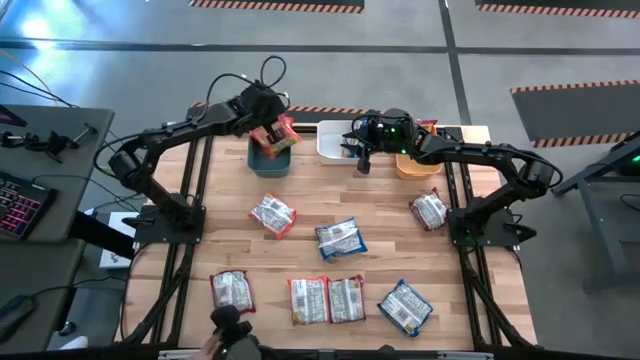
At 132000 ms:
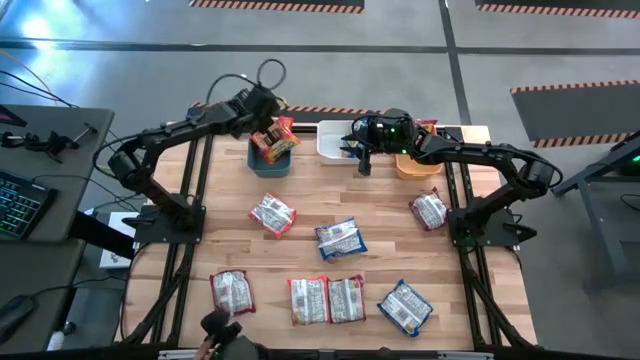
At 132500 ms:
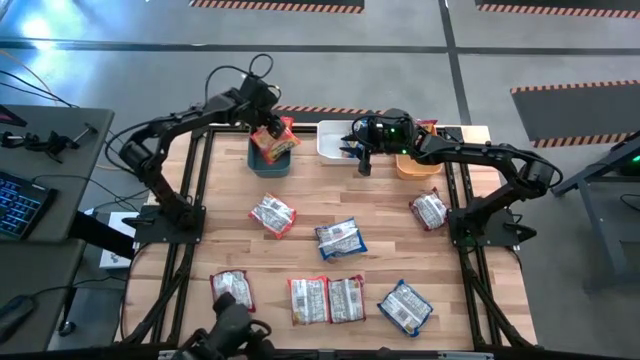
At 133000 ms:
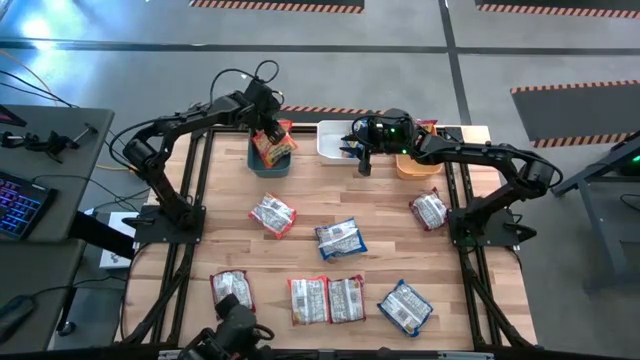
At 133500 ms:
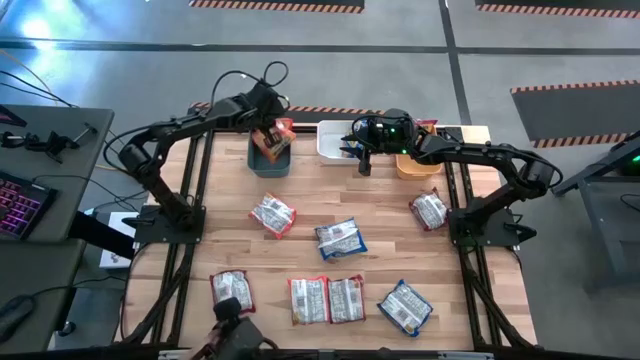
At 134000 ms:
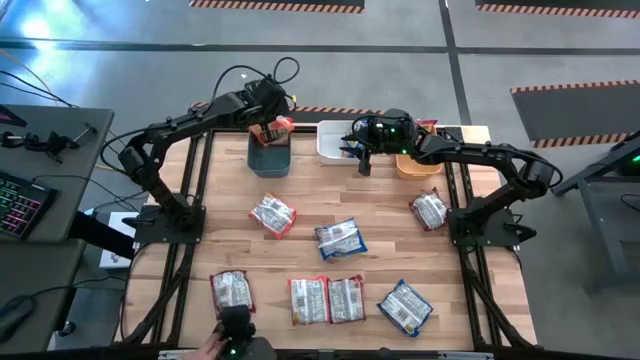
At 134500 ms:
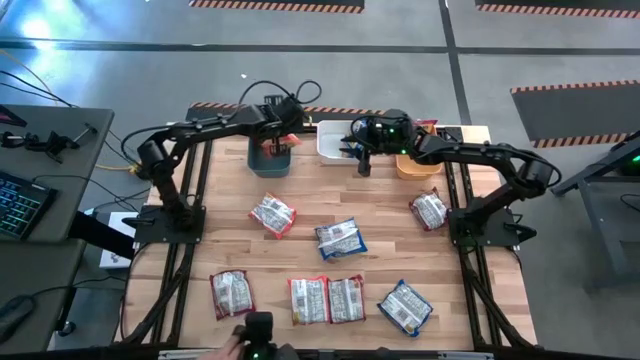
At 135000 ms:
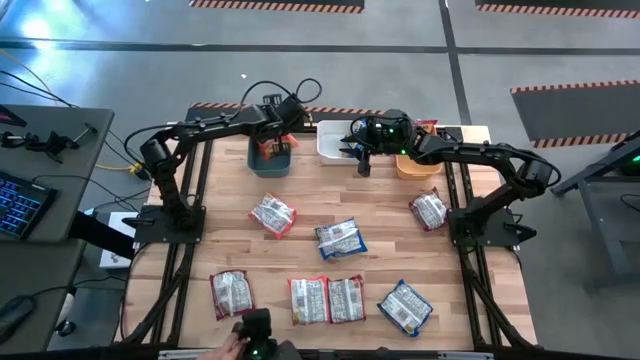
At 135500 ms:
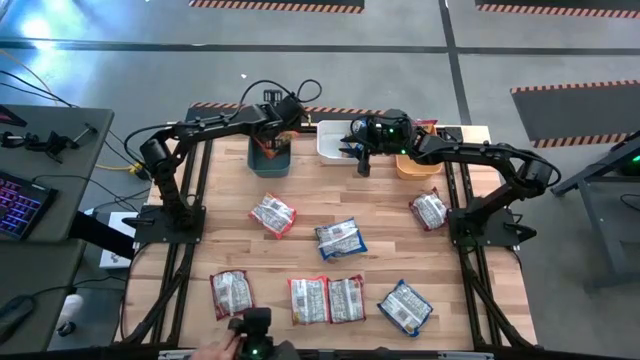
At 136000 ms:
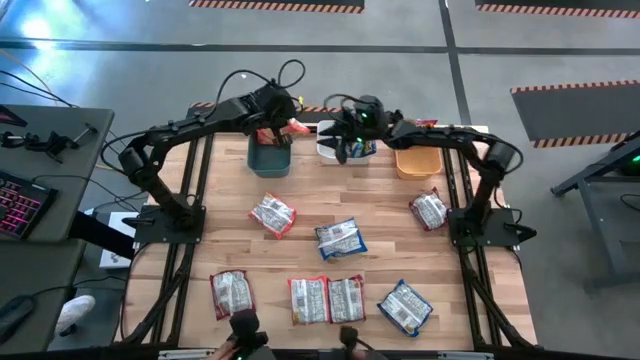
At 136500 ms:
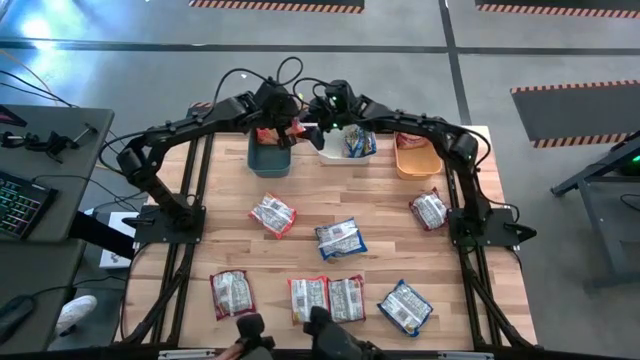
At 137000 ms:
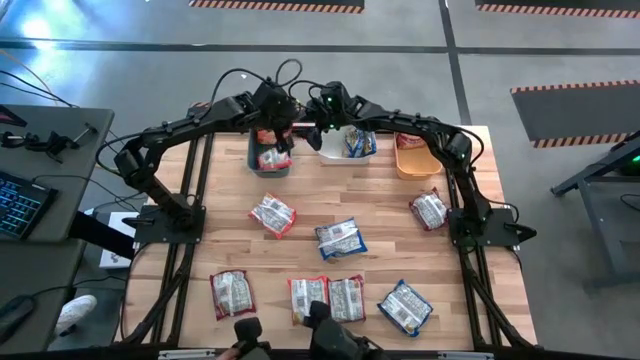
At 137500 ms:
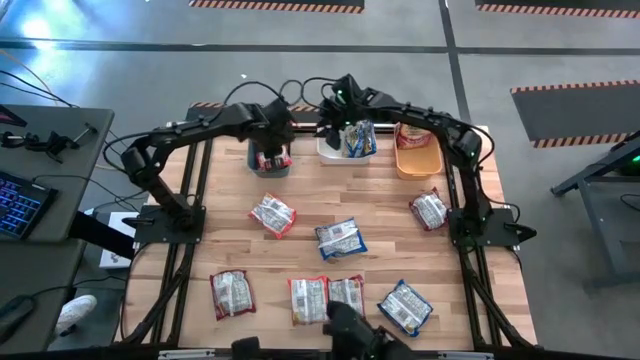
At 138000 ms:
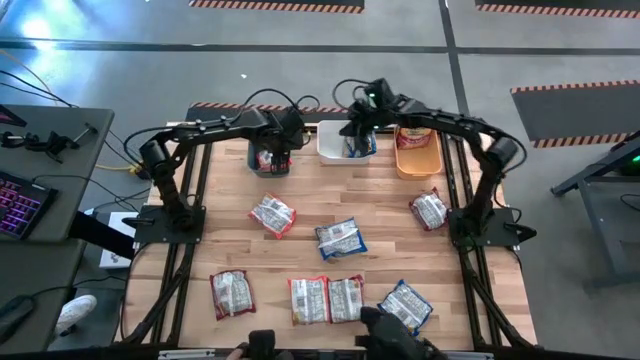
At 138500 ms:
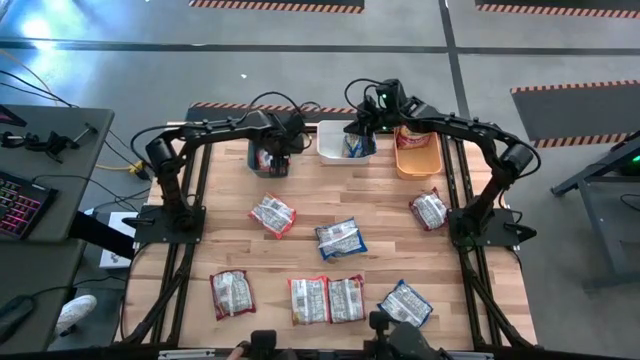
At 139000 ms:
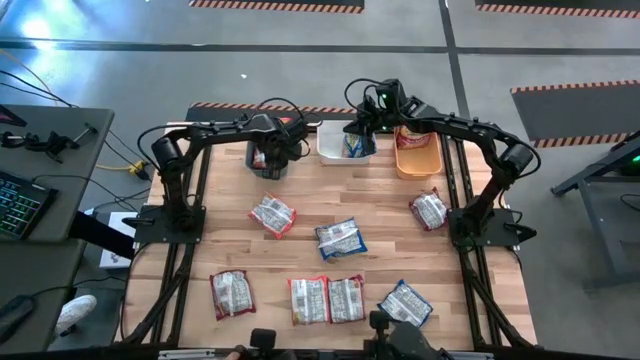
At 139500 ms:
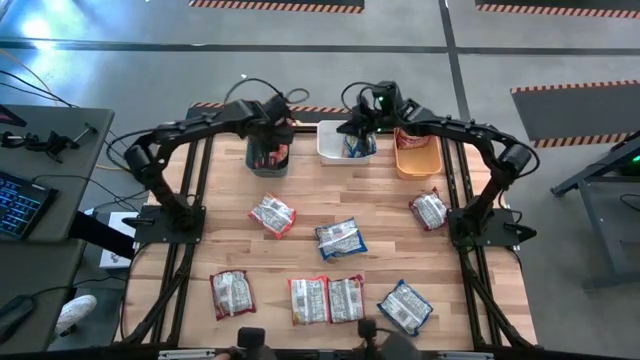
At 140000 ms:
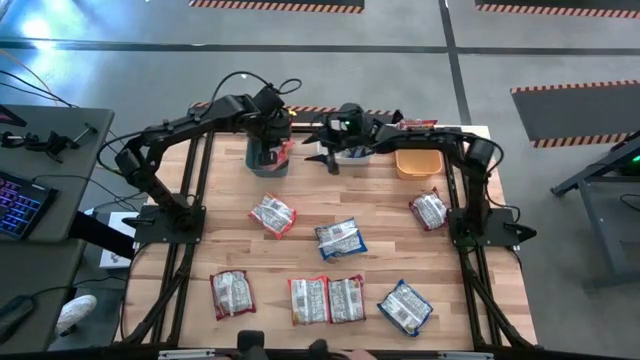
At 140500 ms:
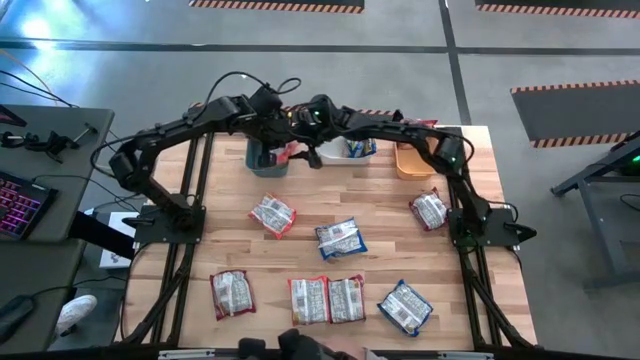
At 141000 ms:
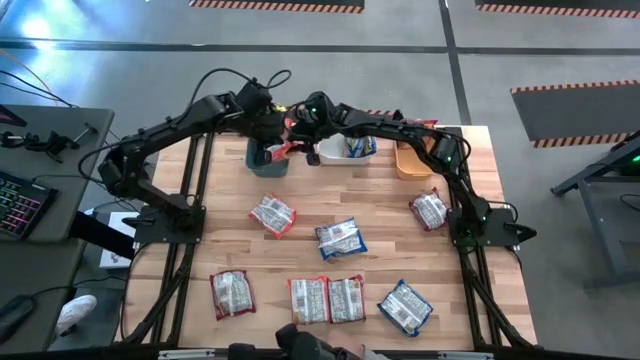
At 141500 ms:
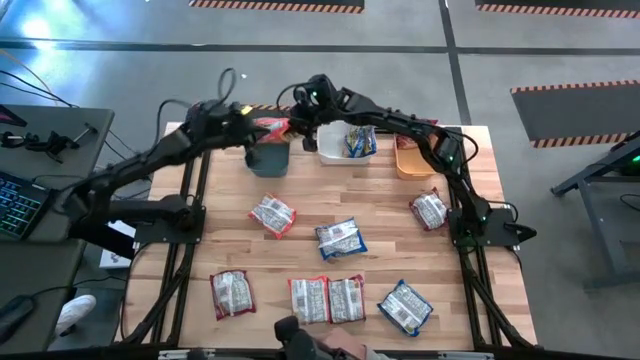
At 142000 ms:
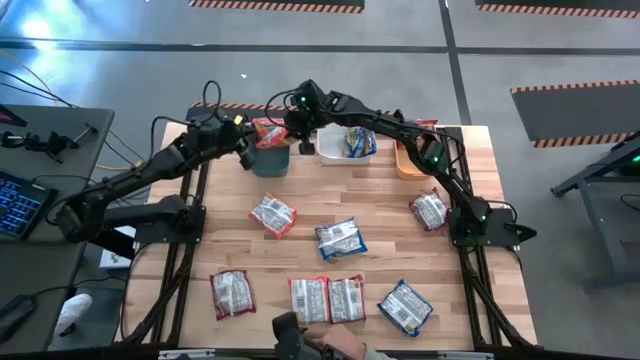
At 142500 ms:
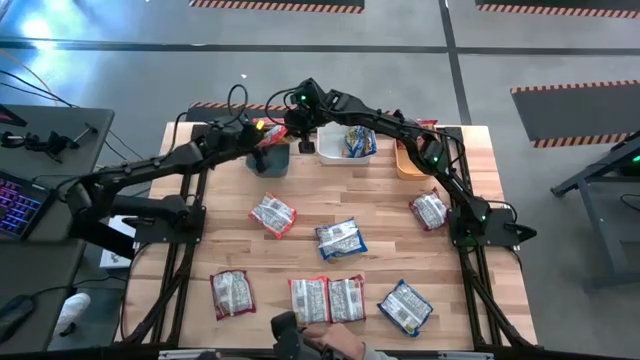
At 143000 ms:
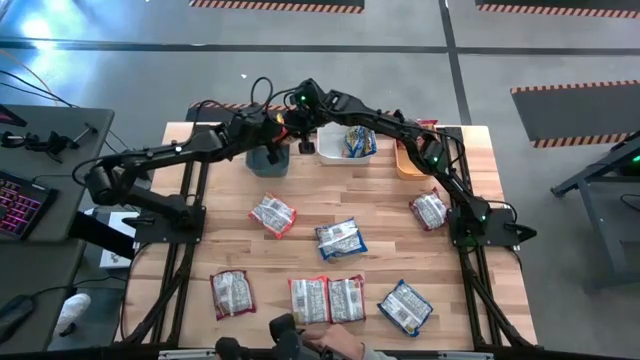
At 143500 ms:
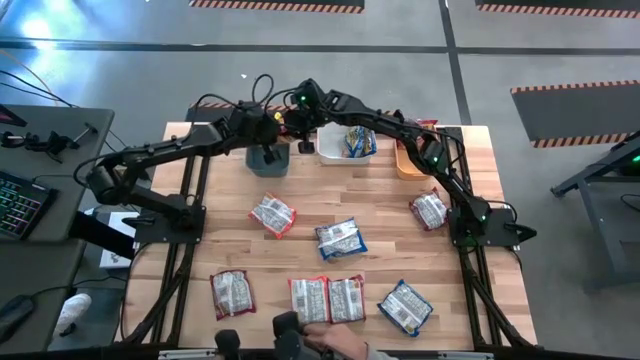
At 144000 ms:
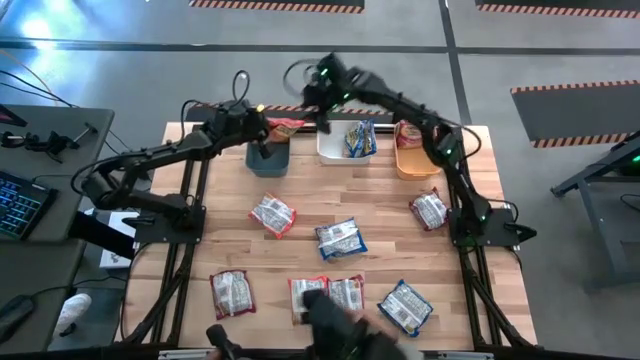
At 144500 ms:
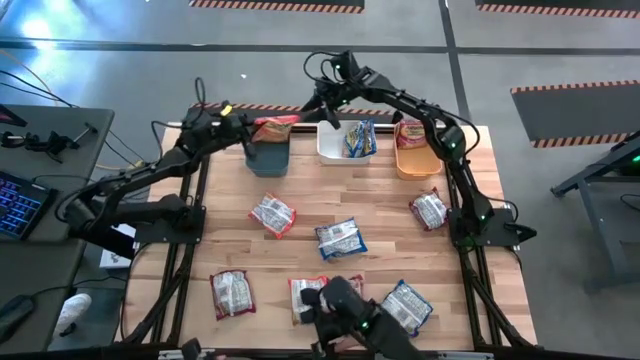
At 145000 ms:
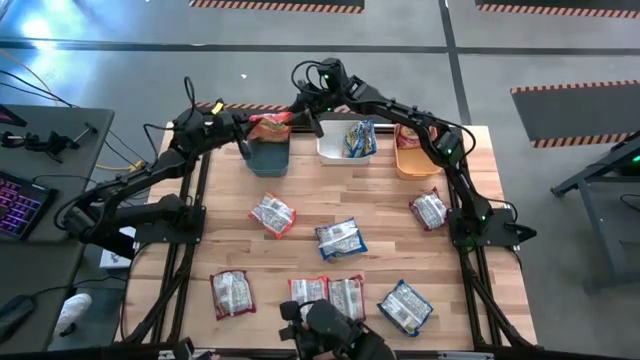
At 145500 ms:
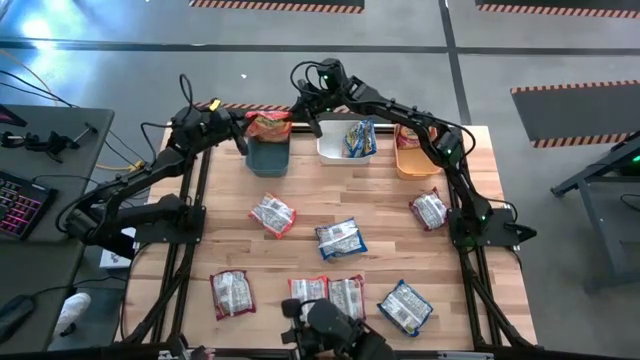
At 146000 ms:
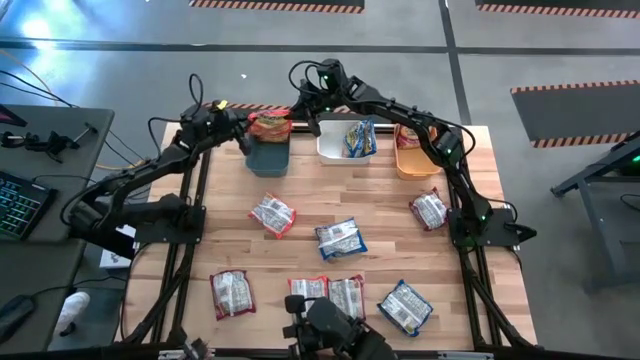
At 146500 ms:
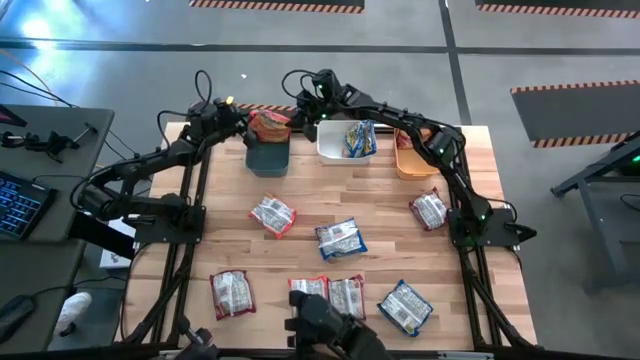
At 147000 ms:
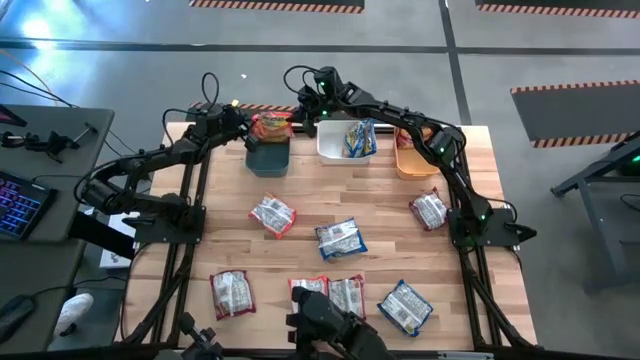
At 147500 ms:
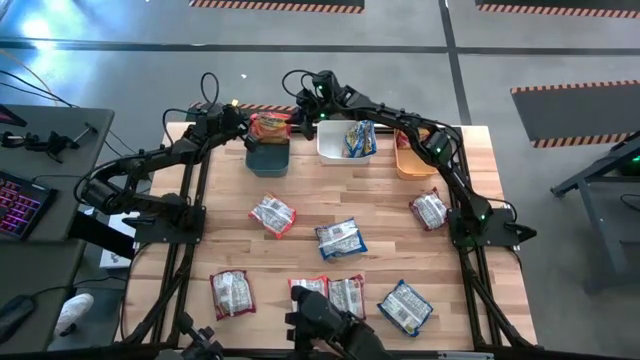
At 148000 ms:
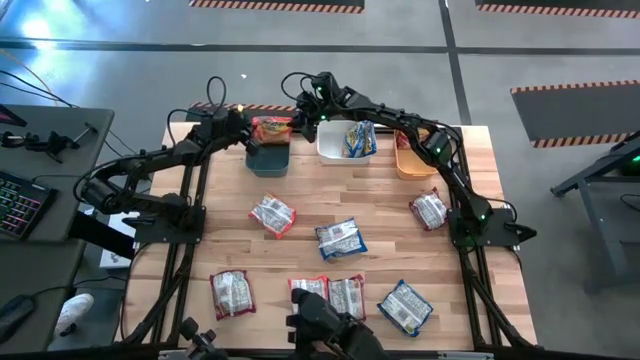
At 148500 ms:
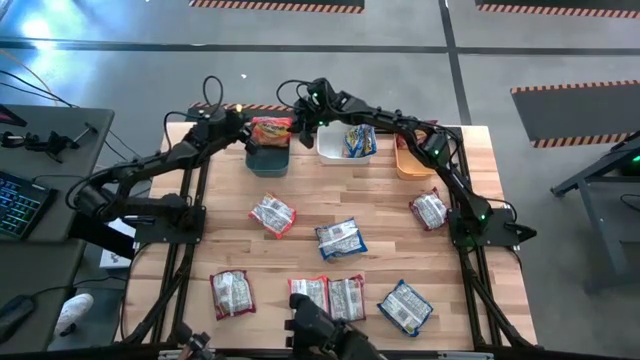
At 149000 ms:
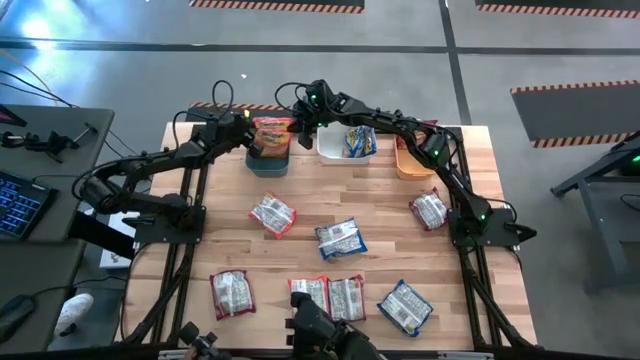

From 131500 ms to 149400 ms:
Task: Sort Maruchan noodles
Put the right orange noodle pack into the blue bin

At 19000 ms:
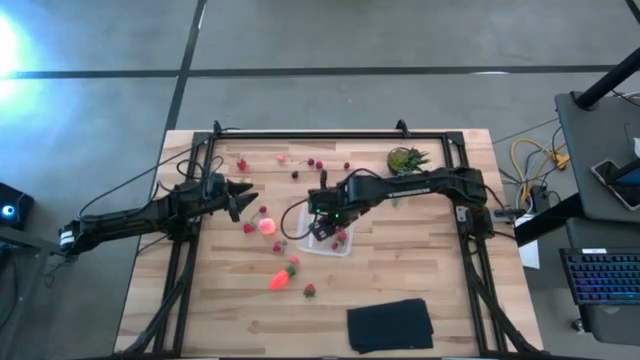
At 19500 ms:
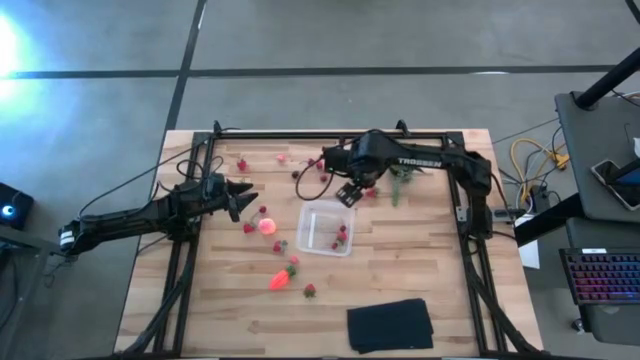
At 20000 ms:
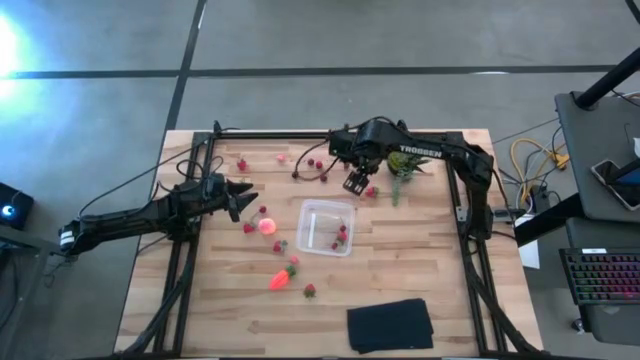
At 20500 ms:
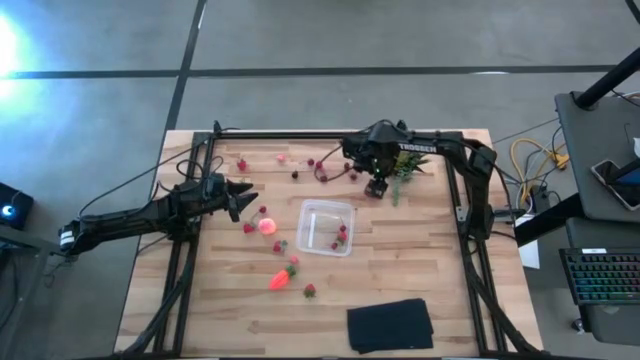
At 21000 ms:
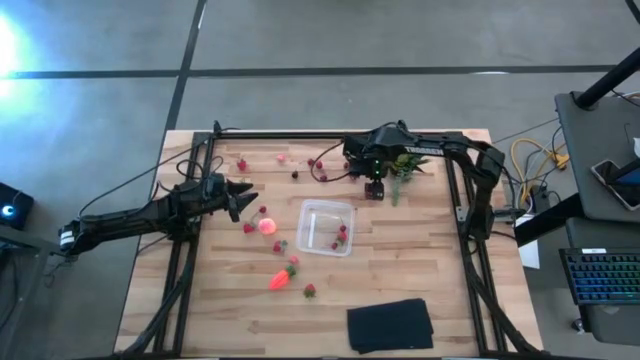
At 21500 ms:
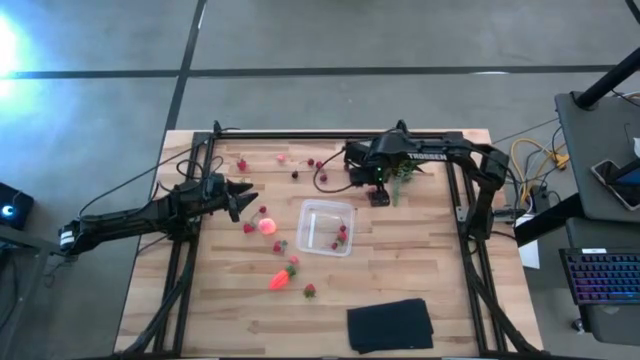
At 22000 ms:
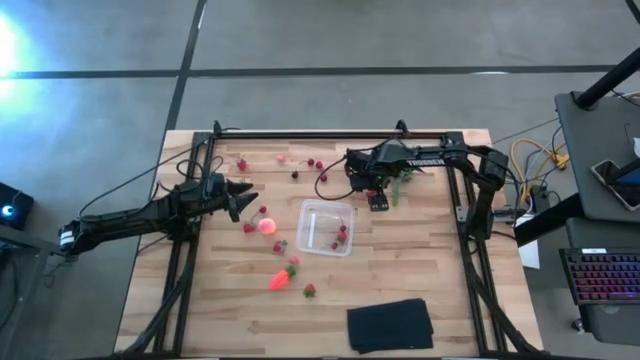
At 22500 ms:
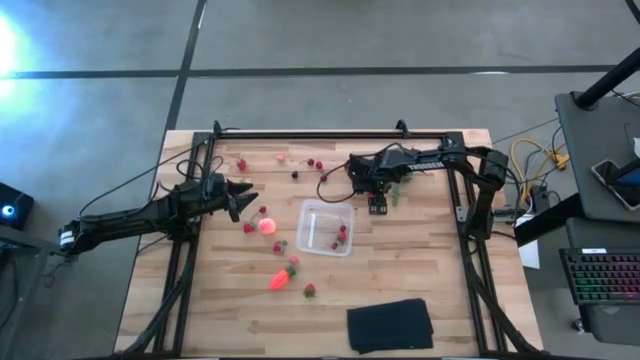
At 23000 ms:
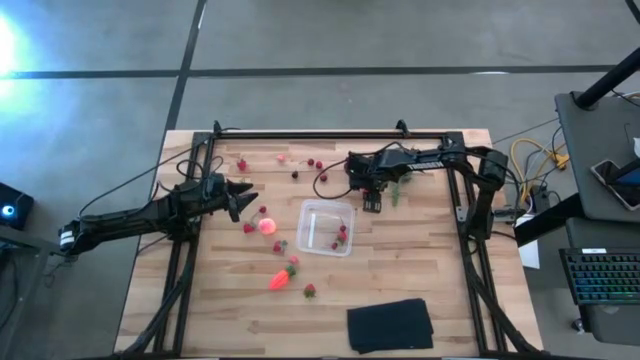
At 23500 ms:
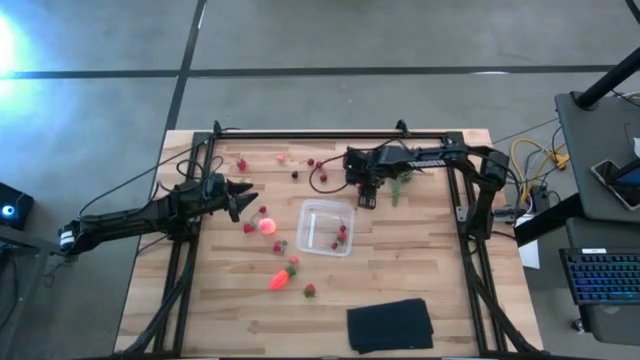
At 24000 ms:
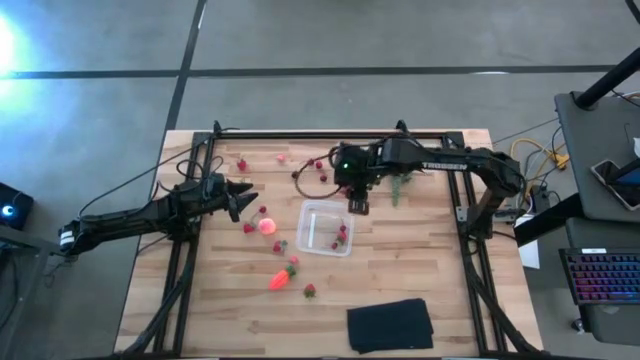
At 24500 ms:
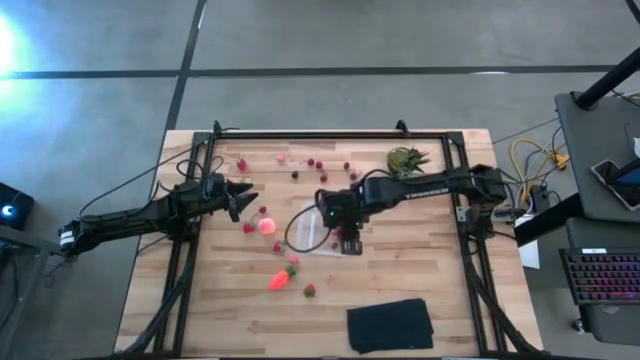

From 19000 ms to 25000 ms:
Task: Pick and placing Produce into tupperware
Put the red strawberry into the transparent bin
